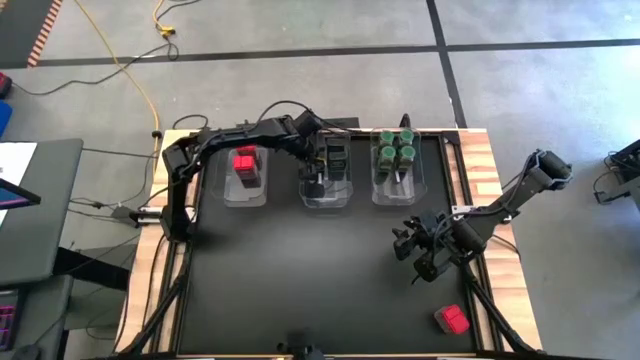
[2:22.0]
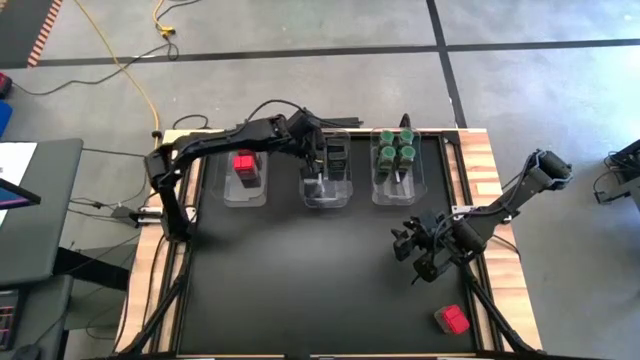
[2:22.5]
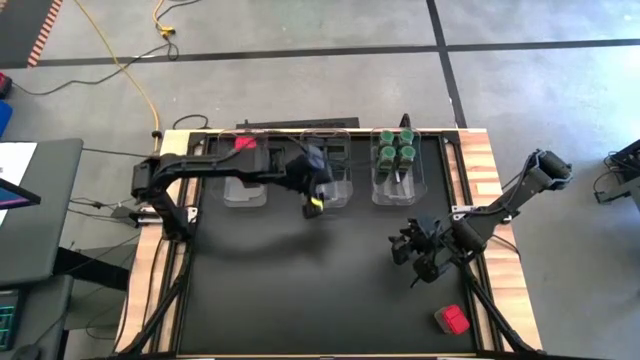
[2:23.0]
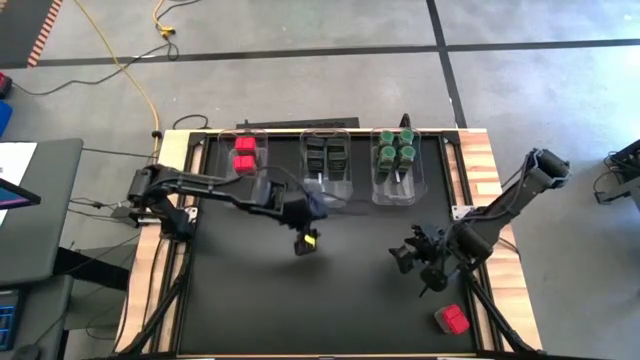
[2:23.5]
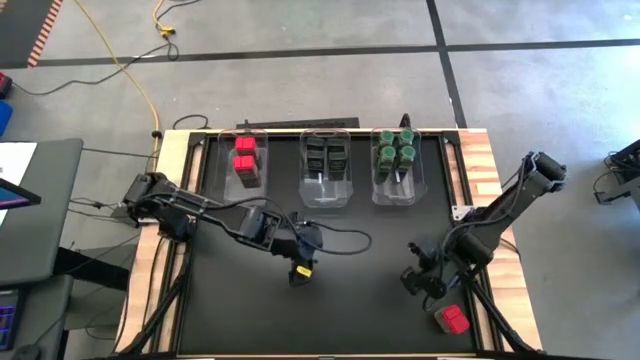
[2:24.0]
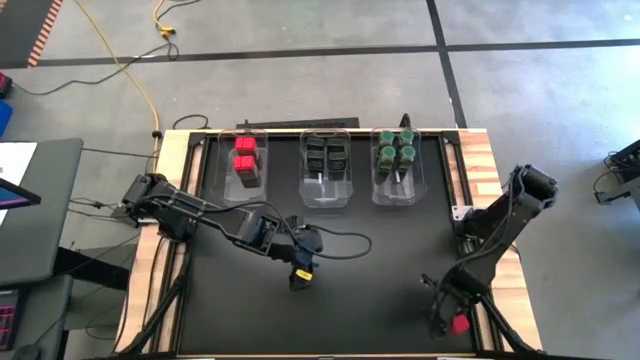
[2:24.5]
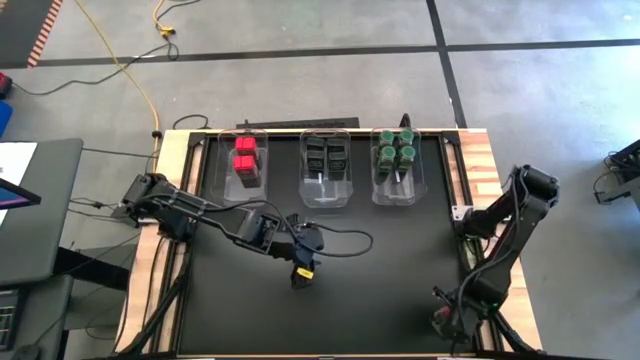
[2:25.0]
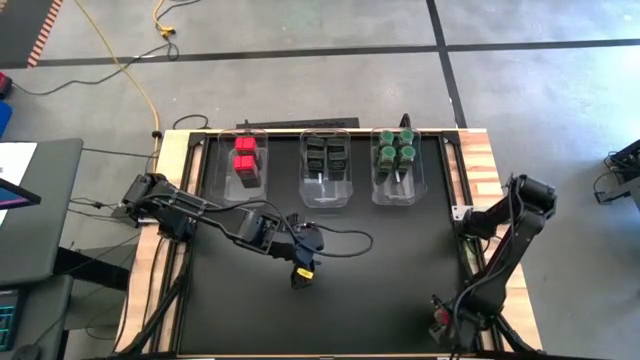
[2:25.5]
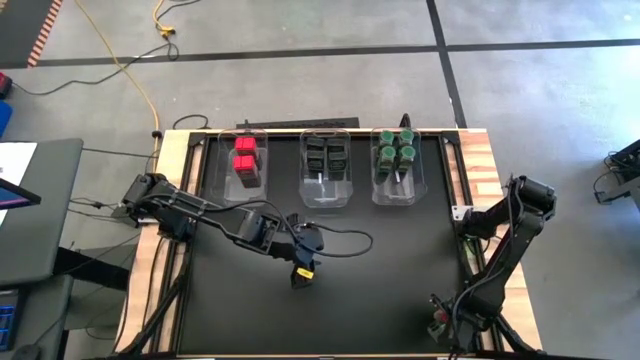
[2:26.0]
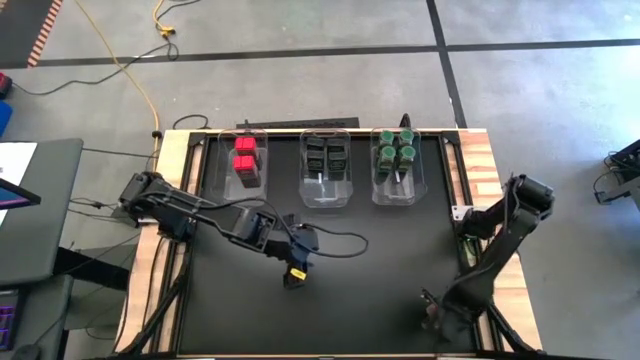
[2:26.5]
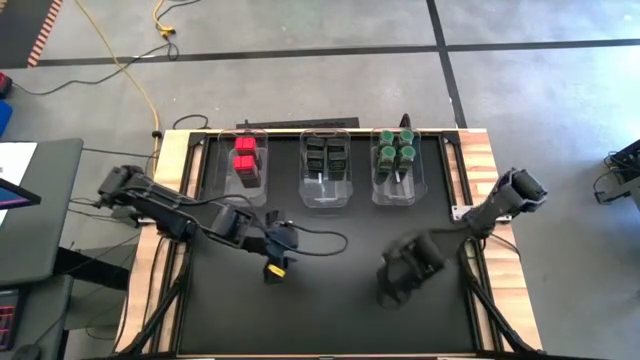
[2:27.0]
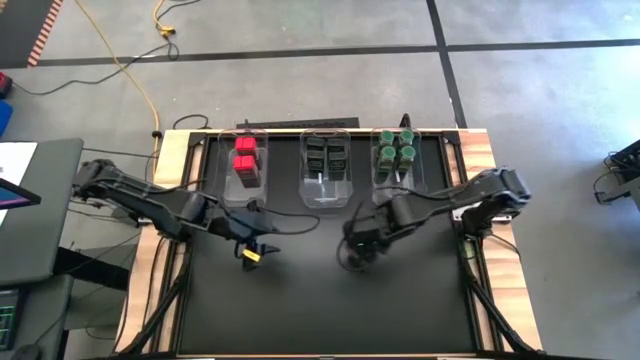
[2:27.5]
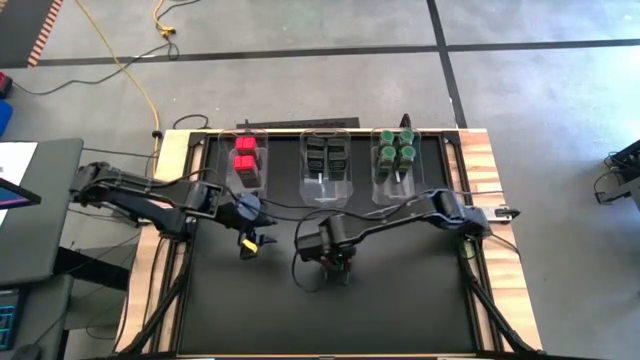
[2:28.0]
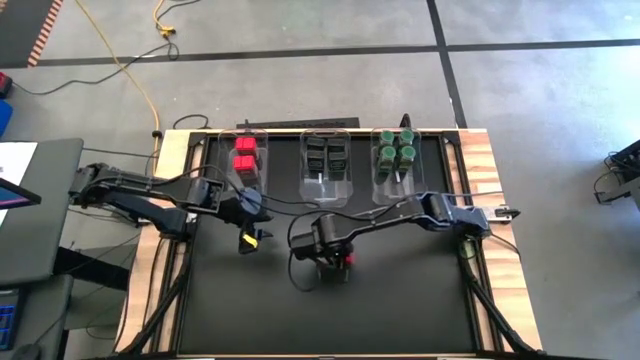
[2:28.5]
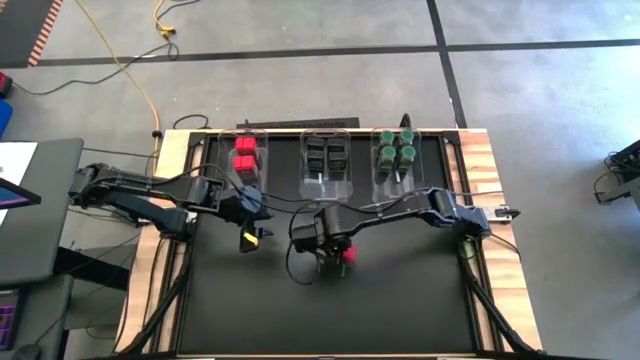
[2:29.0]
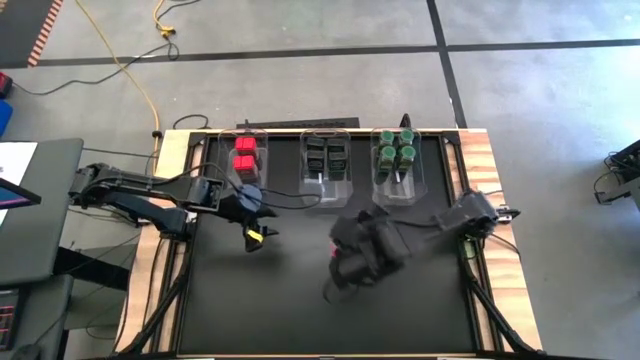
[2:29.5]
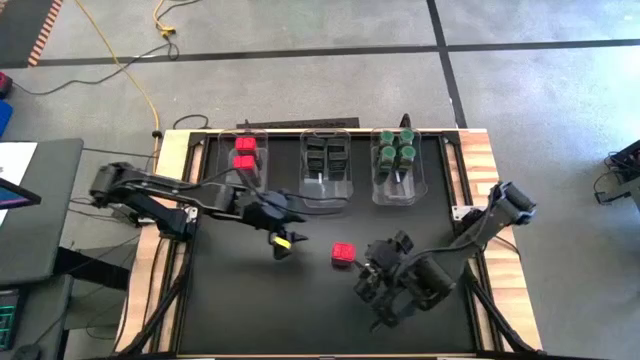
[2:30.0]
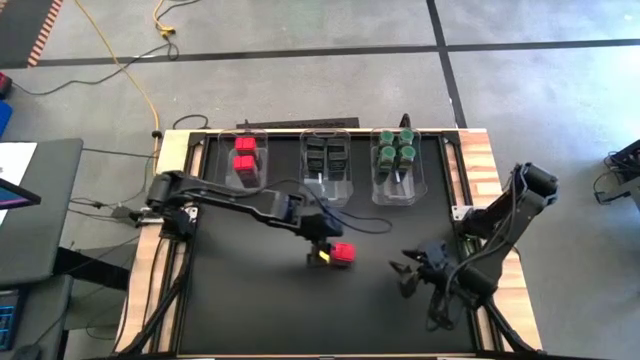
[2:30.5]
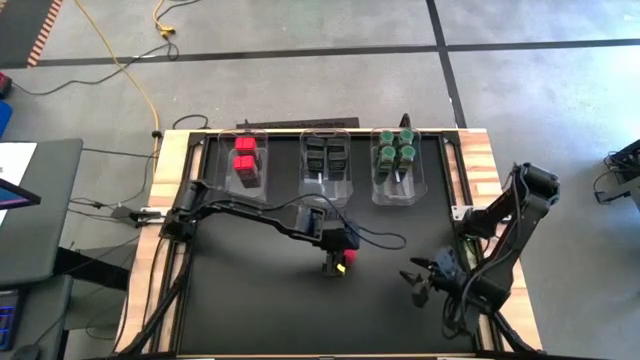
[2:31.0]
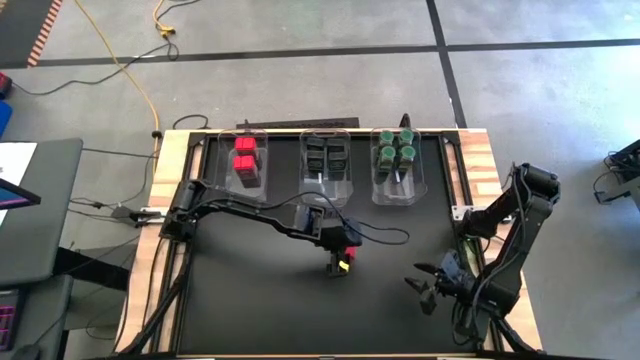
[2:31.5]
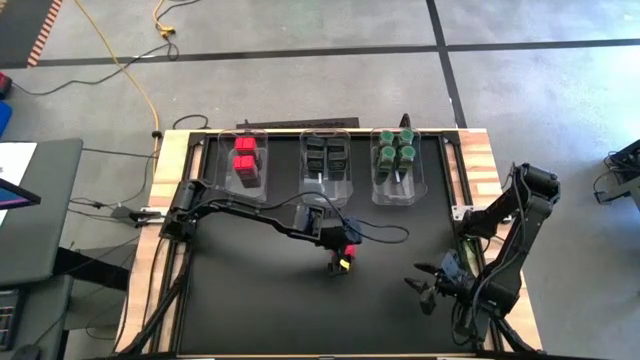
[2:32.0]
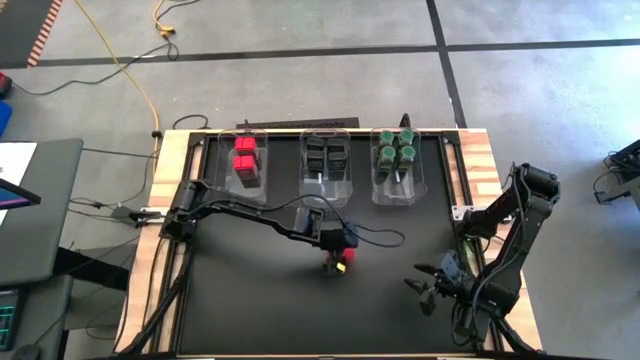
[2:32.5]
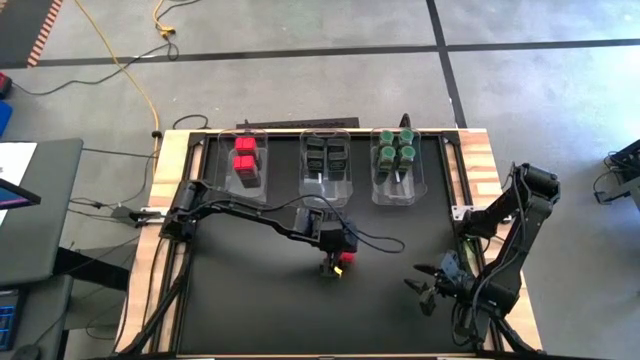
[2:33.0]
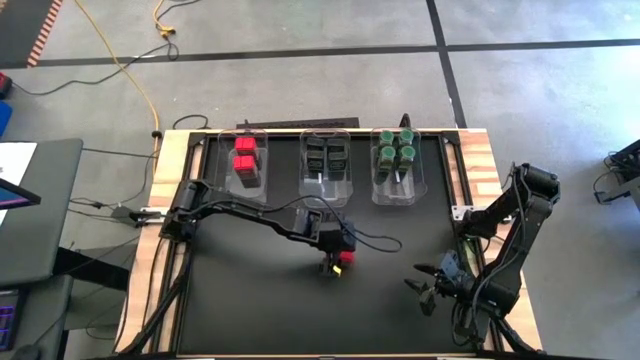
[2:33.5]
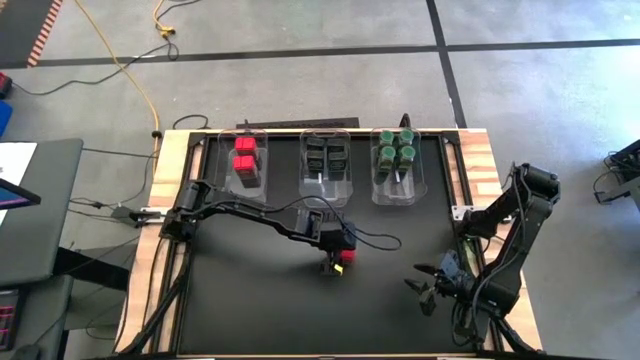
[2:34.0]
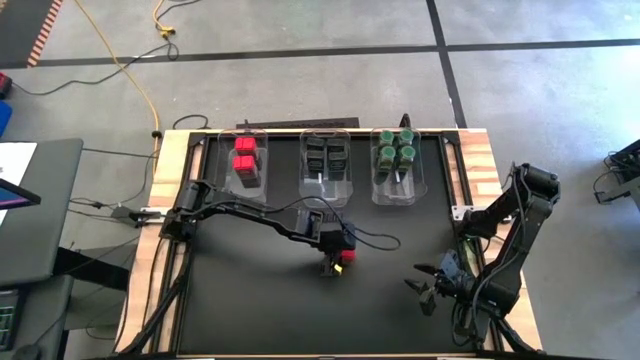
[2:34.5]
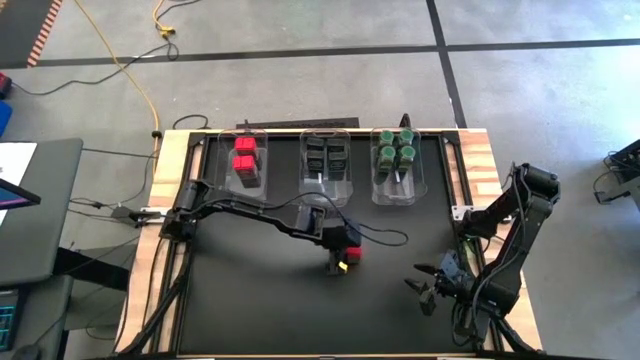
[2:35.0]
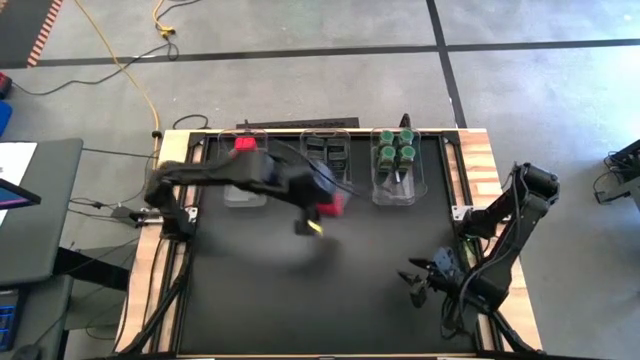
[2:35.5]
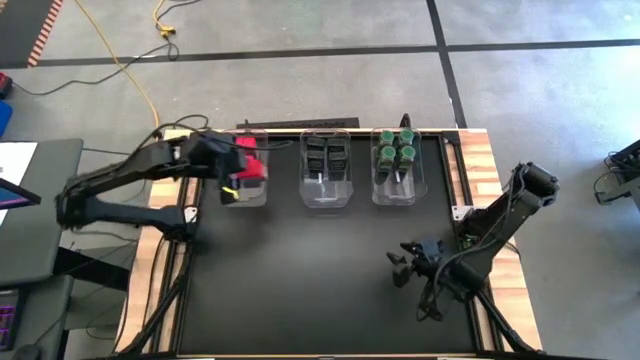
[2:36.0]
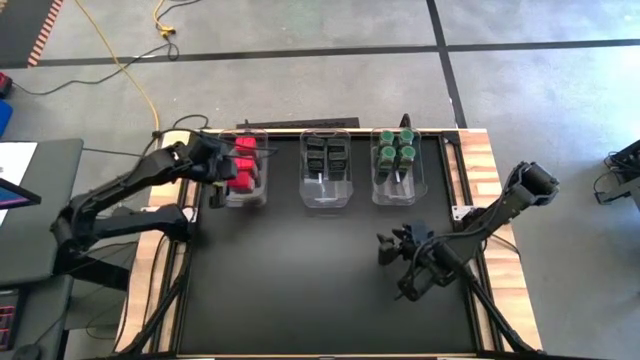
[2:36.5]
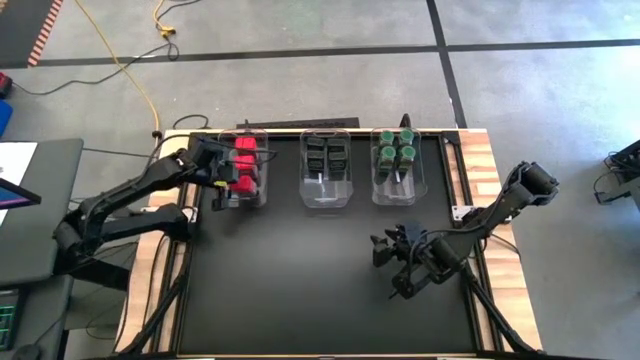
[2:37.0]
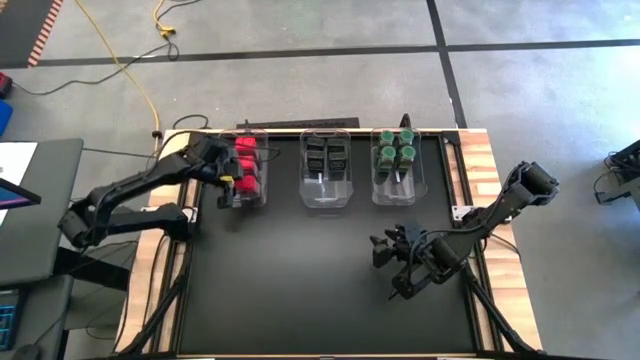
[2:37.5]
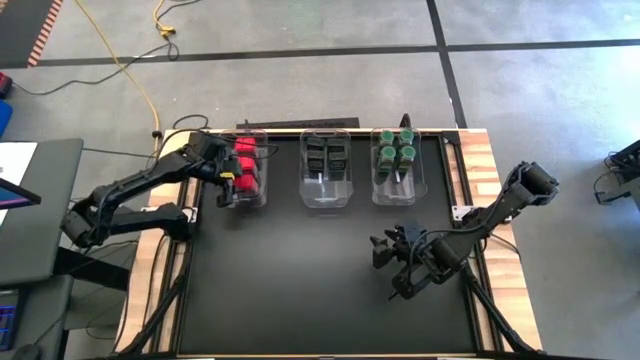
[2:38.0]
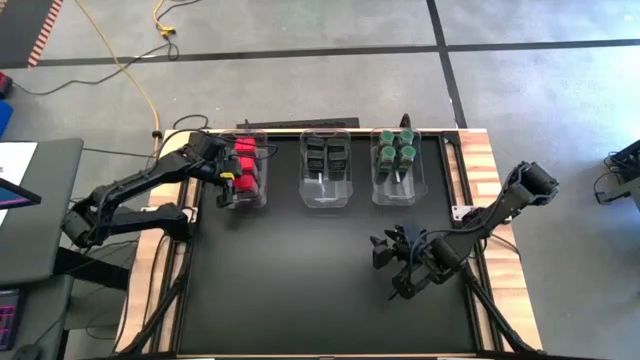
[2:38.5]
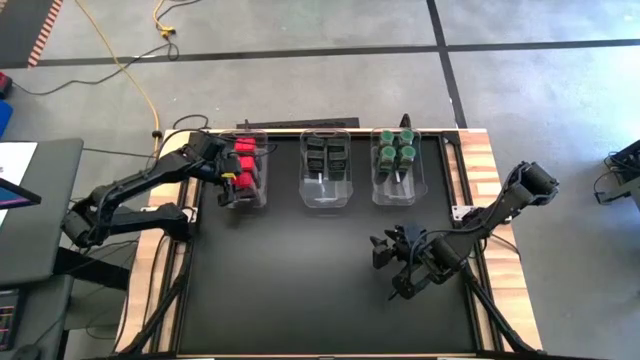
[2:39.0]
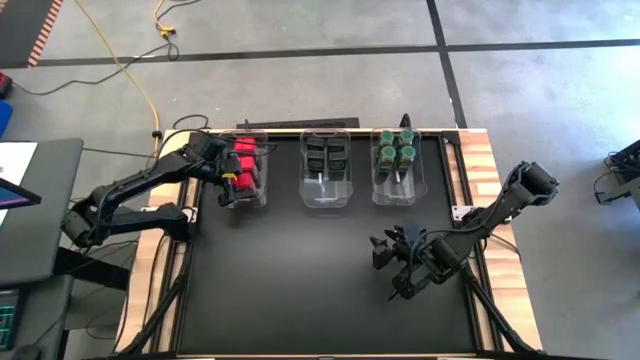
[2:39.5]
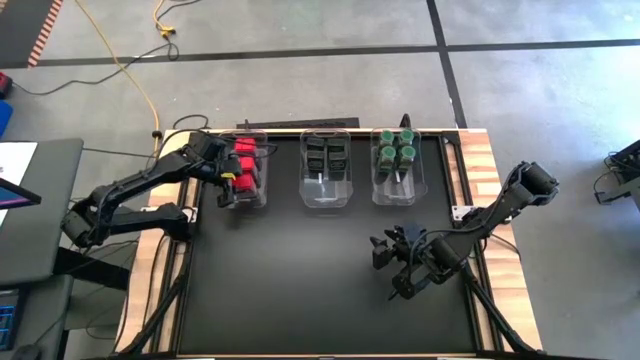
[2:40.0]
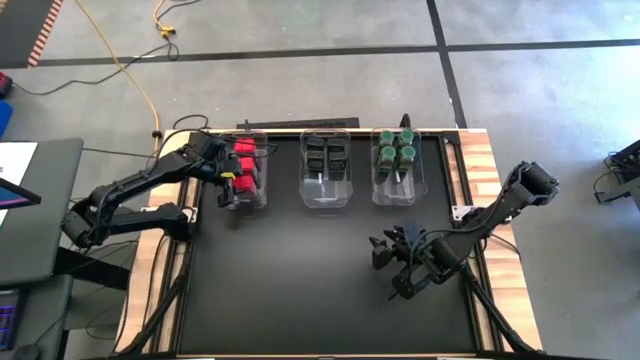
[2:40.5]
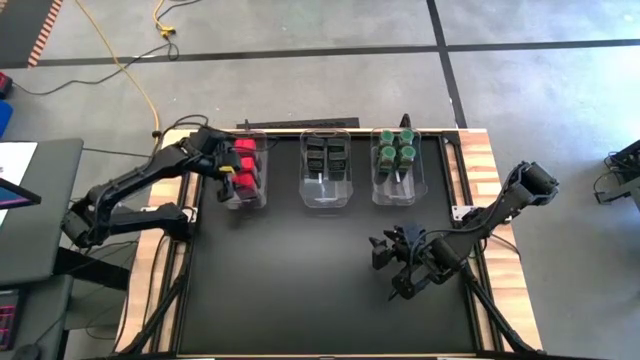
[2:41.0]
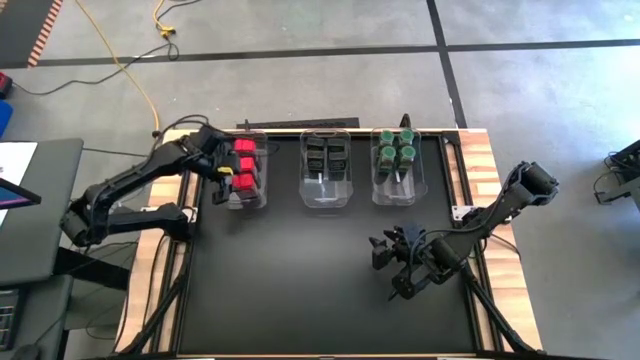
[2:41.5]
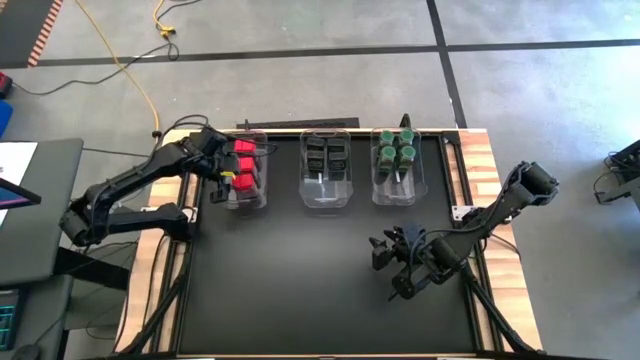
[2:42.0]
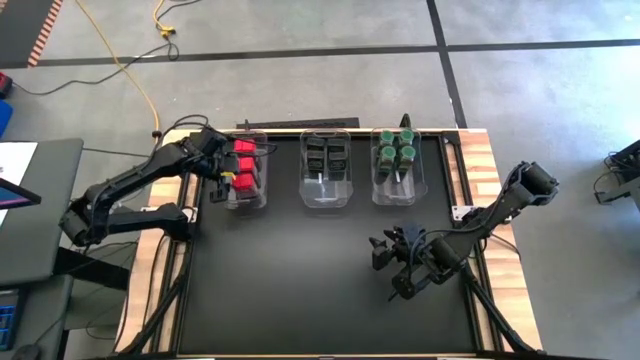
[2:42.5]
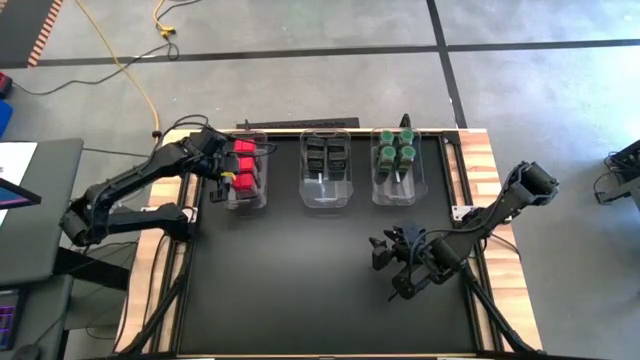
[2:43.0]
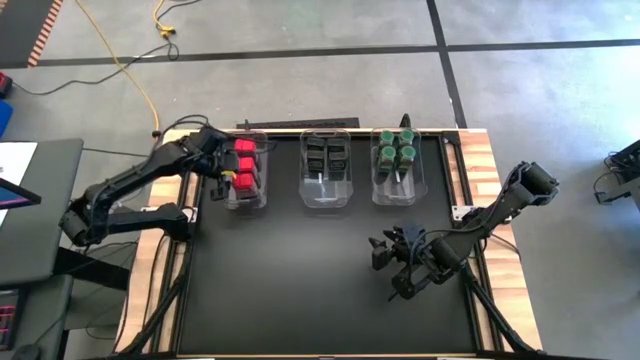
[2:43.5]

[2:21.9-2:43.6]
Task: Sort spices by type
Put the red seasoning can into the left transparent bin
